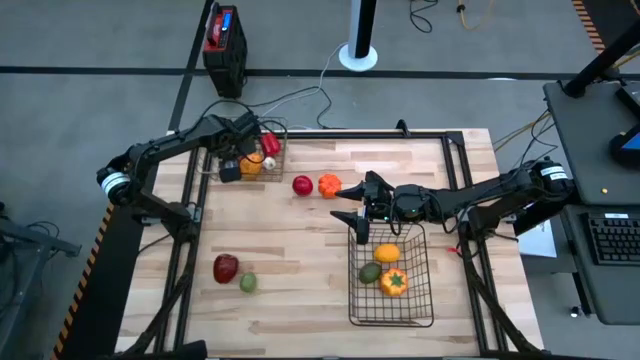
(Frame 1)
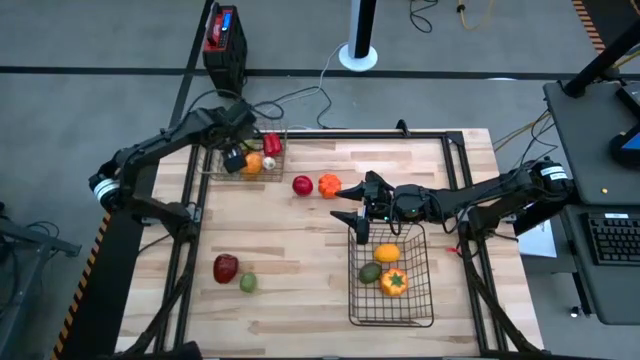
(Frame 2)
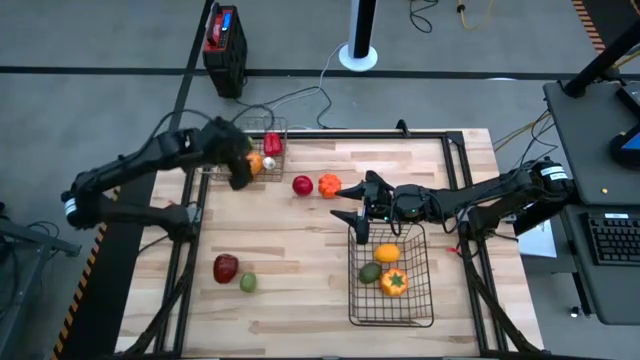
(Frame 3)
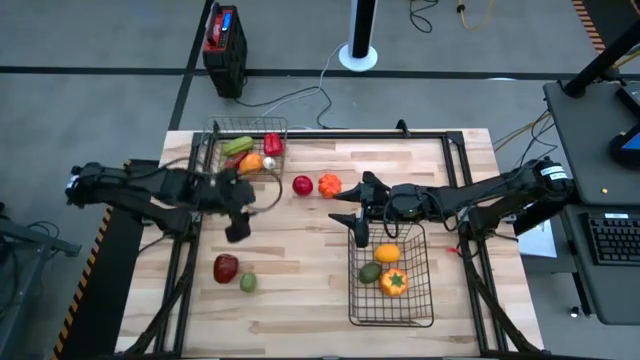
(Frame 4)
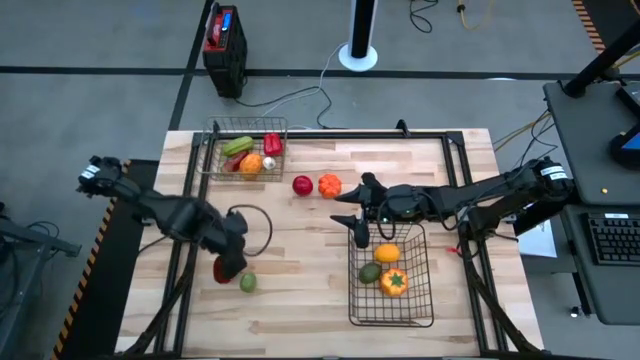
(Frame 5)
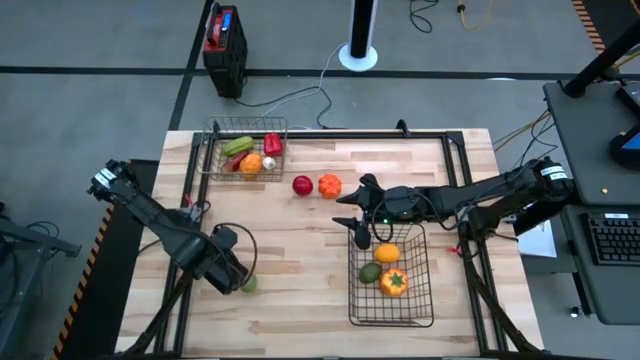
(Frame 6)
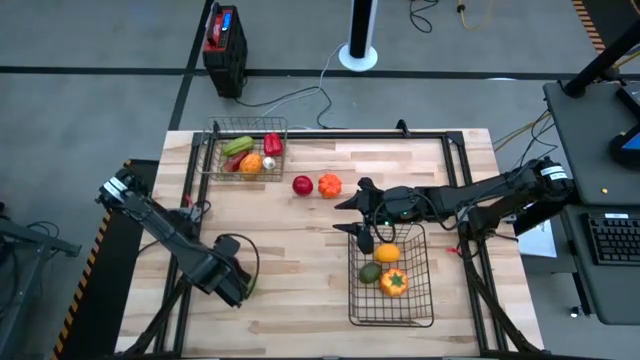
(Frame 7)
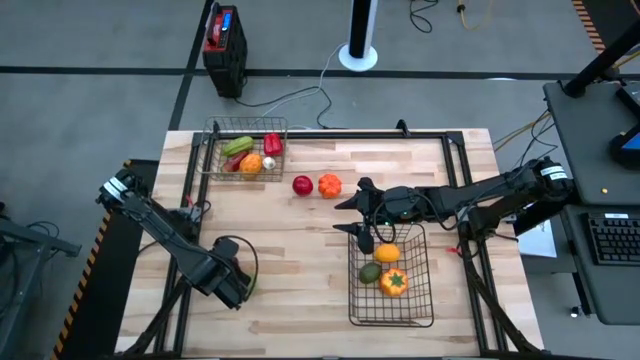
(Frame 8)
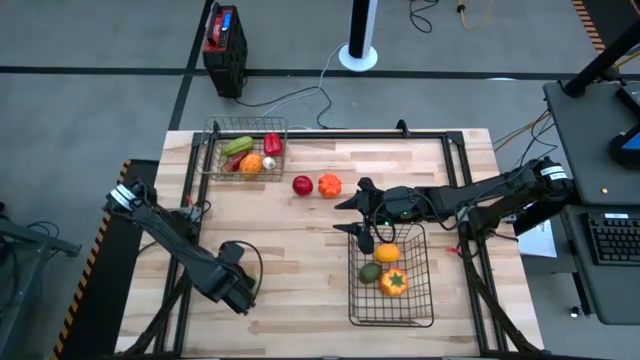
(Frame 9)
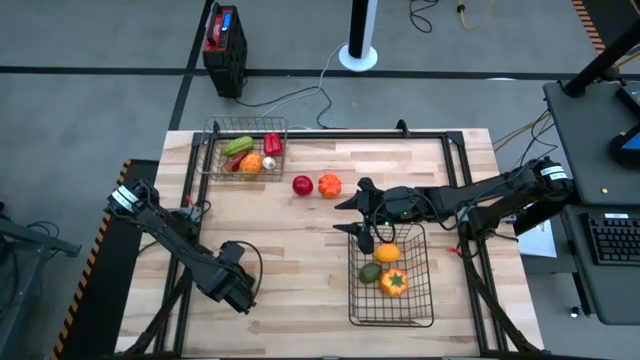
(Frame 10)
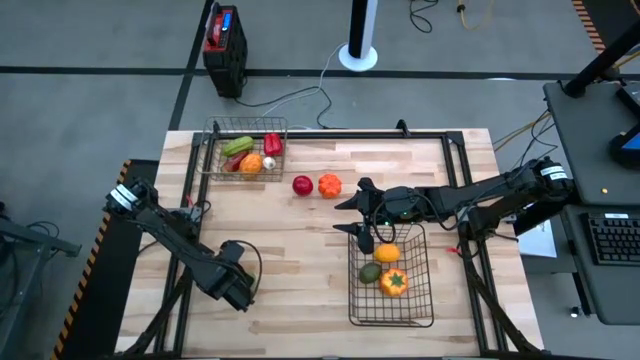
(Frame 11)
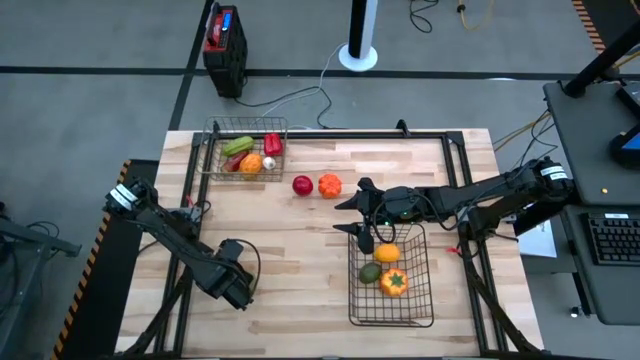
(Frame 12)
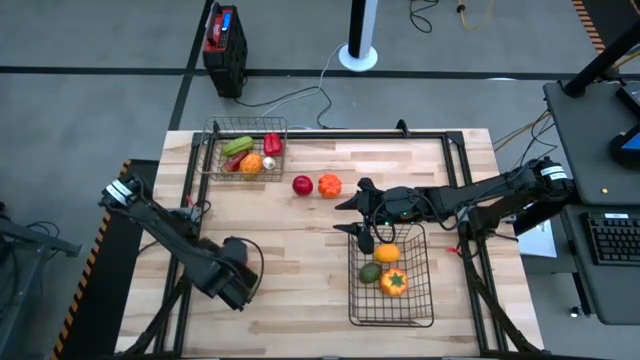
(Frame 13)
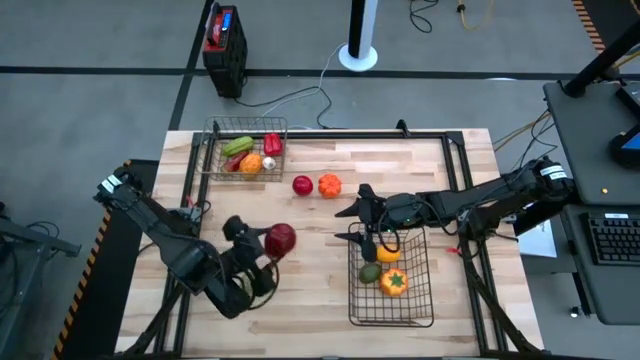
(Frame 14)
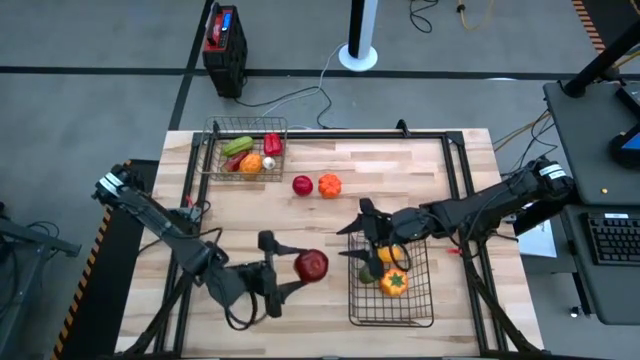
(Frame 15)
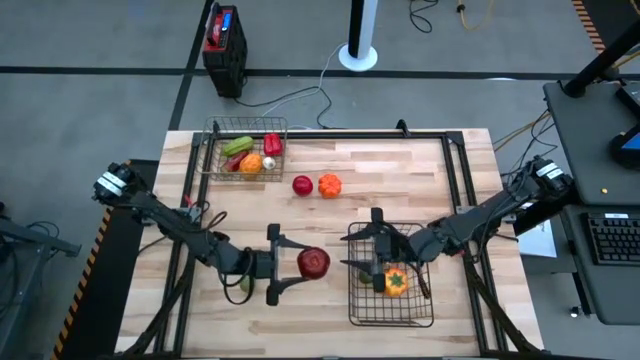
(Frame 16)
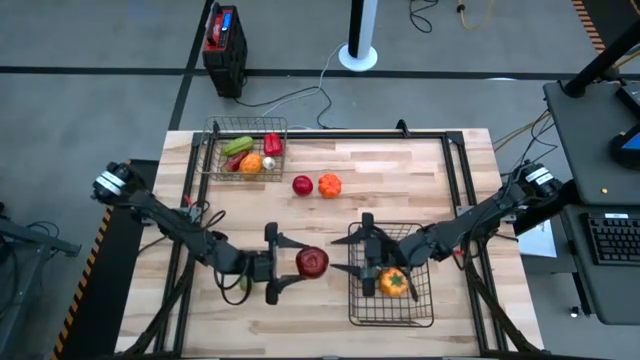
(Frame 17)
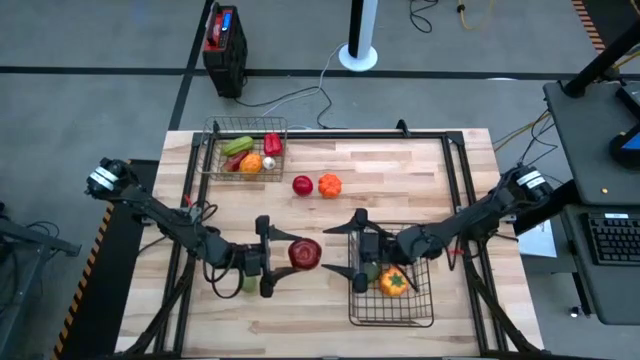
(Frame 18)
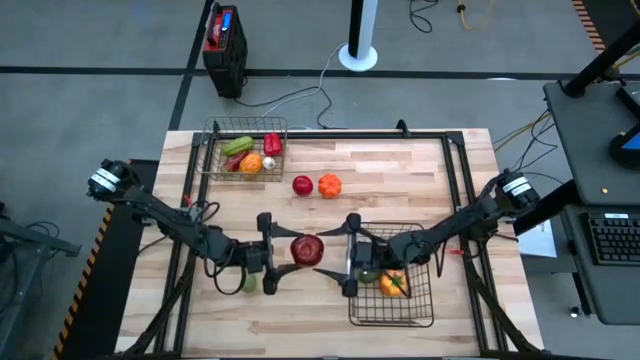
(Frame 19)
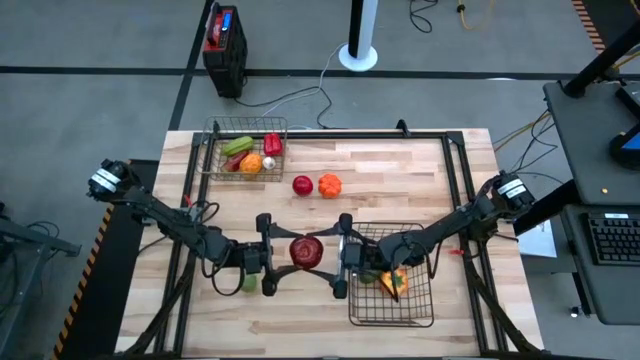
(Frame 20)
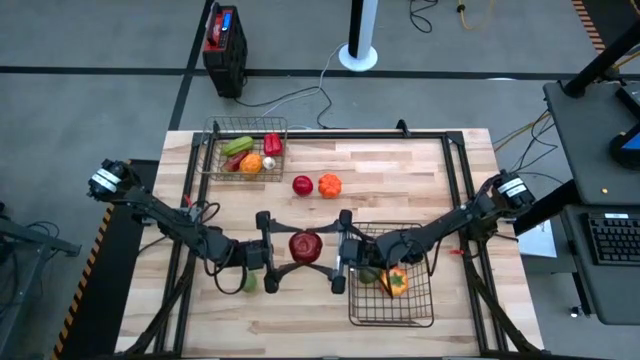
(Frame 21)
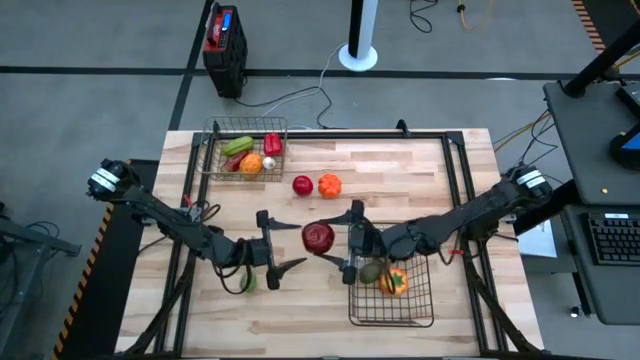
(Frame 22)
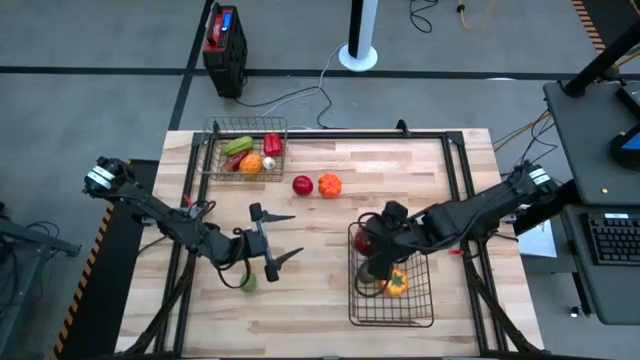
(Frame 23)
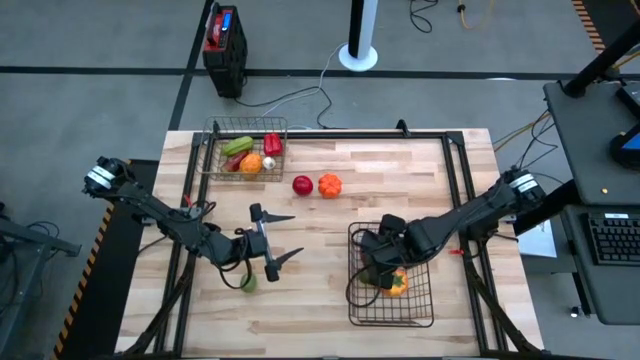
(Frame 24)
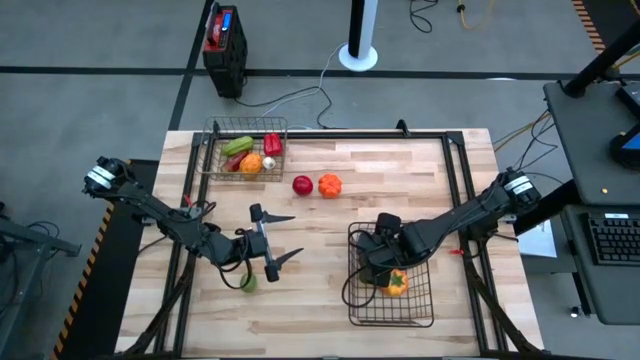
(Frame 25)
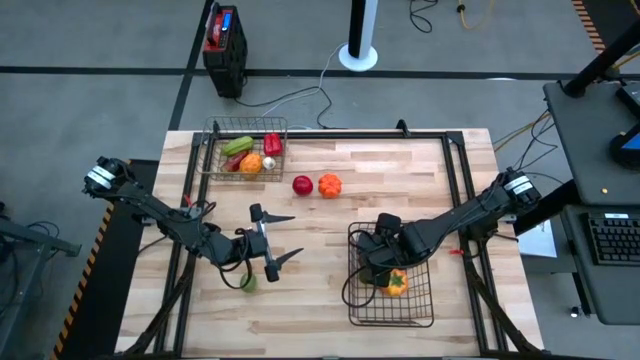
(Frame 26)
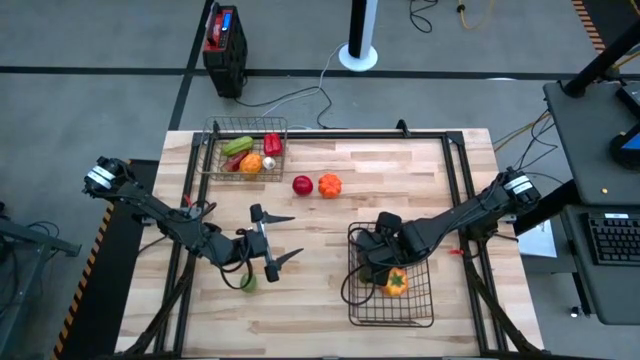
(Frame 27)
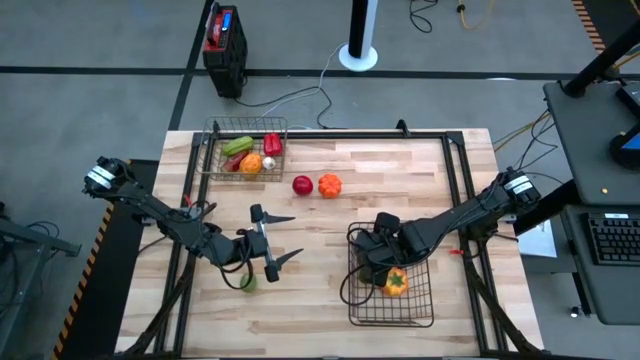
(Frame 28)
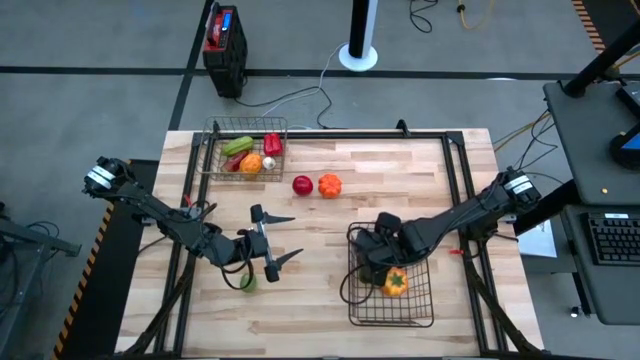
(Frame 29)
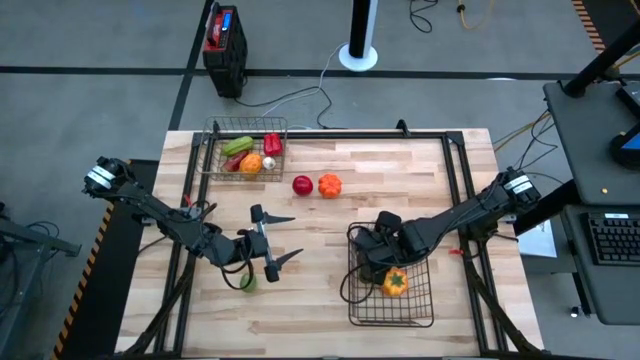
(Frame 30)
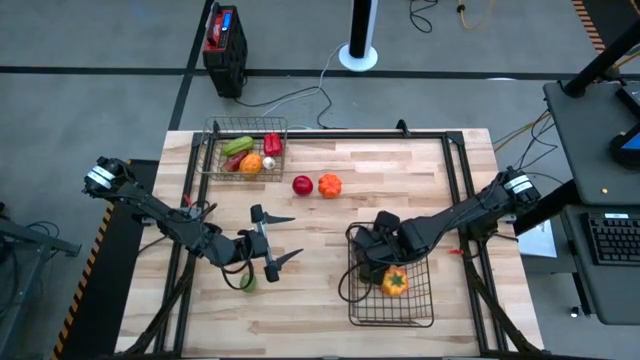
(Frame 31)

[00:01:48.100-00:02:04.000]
Task: Sort produce into baskets
Put the red apple into the black wire basket

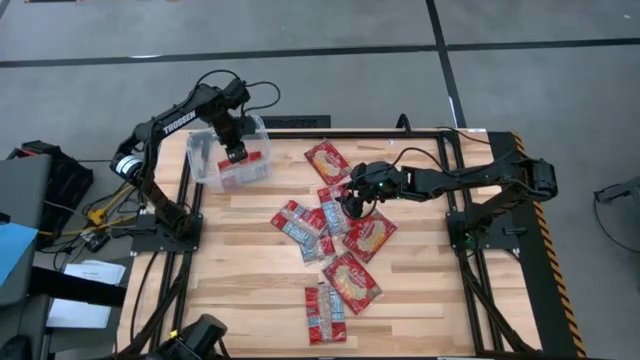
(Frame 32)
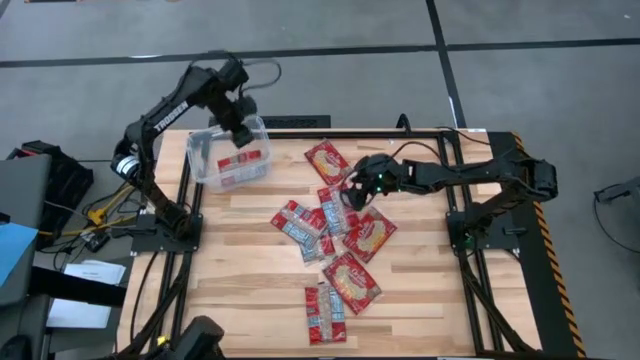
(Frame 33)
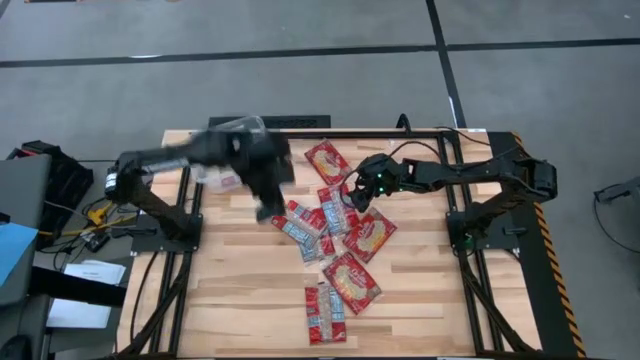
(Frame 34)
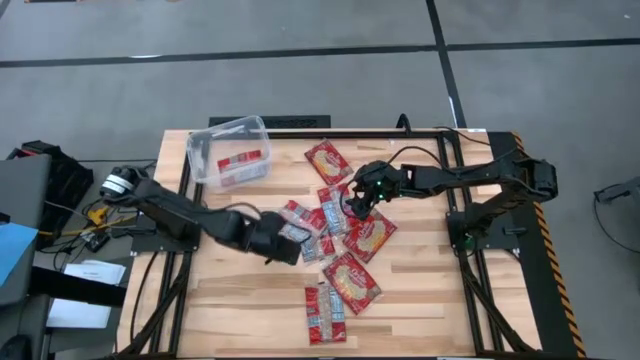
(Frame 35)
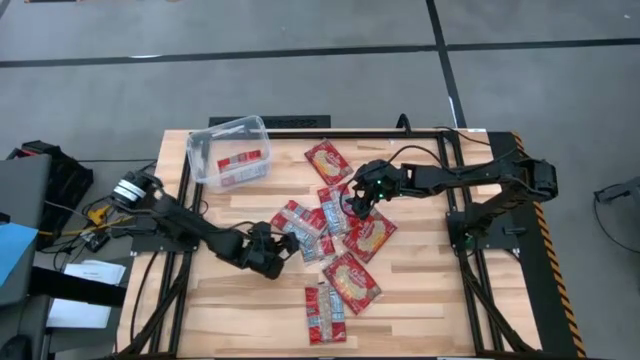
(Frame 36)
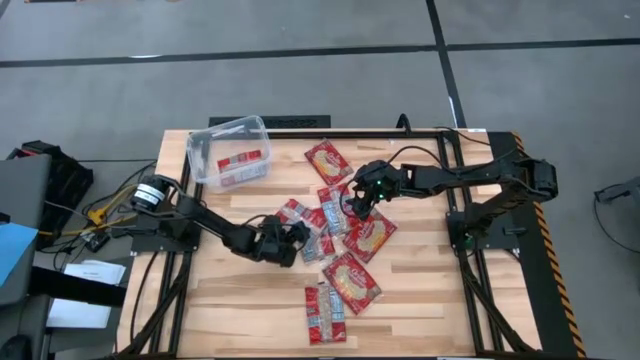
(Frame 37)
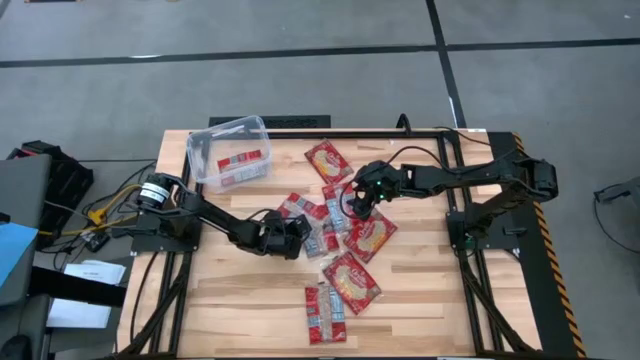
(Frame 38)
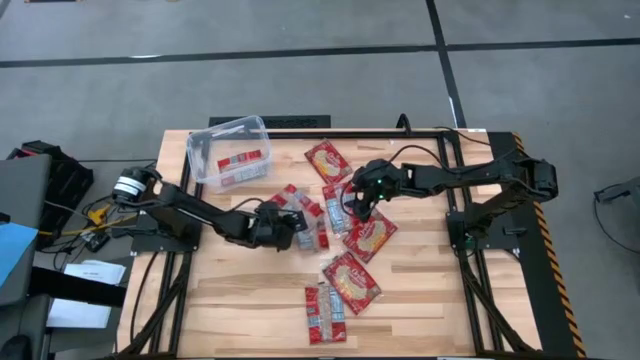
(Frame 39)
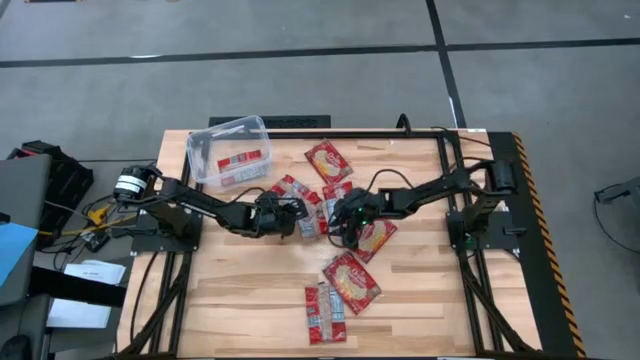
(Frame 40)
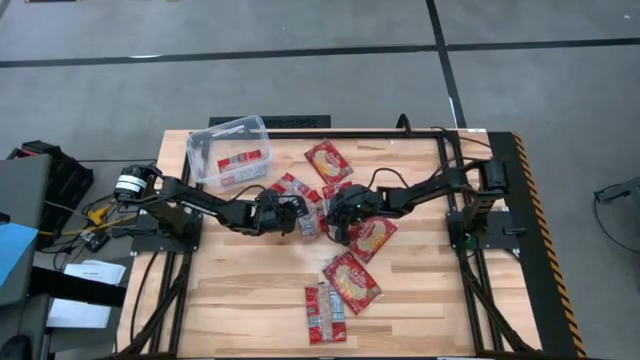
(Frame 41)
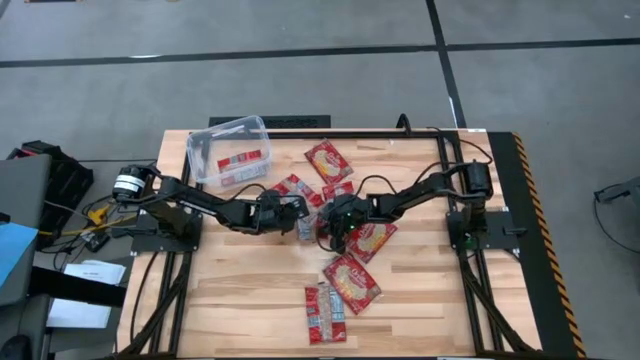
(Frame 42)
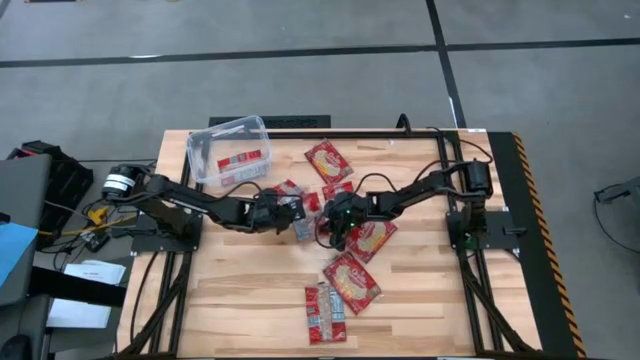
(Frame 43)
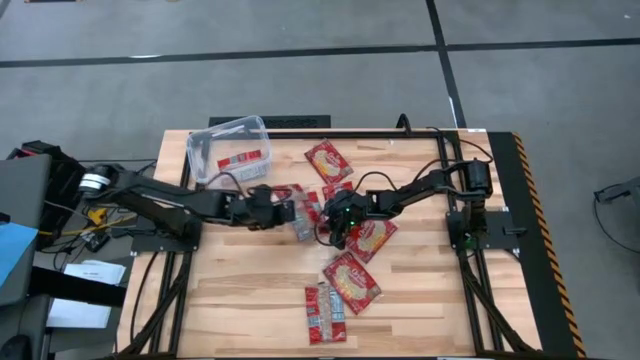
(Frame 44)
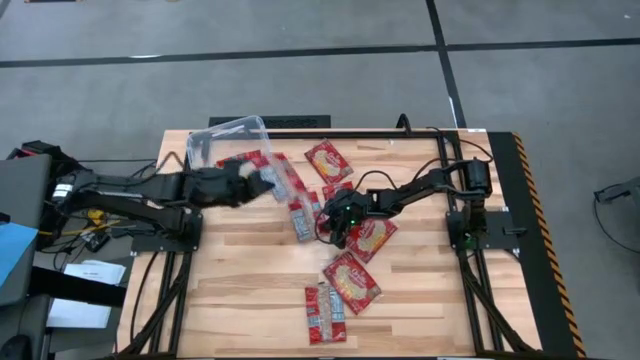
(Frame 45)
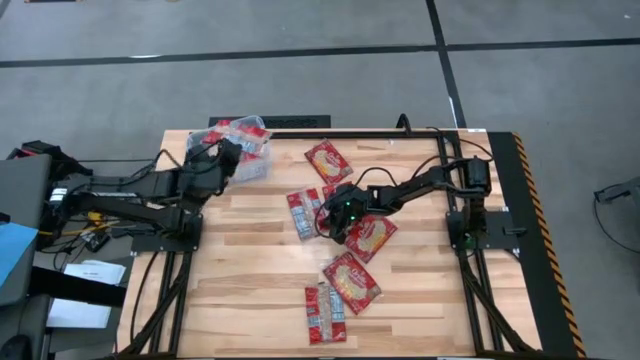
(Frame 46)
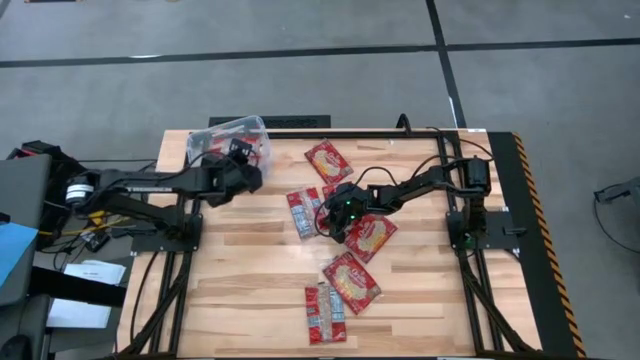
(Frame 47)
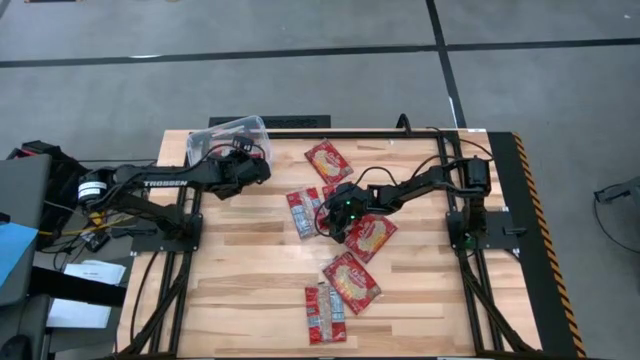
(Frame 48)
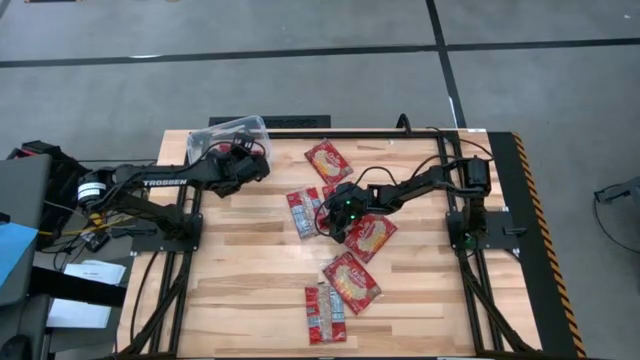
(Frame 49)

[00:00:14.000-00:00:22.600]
Task: Sort popcorn bags into baskets
Put the red popcorn bag into the transparent bin
